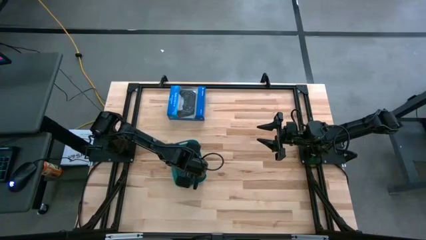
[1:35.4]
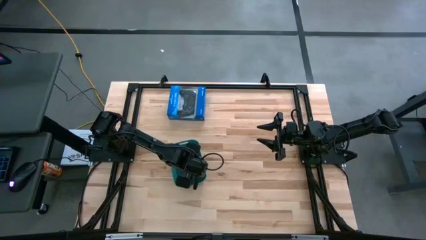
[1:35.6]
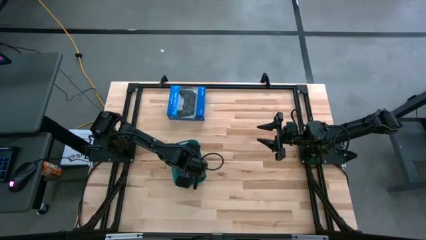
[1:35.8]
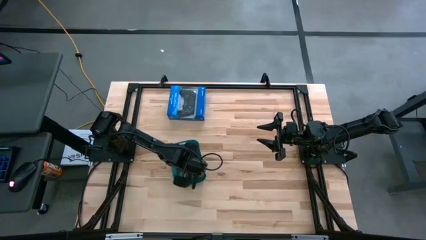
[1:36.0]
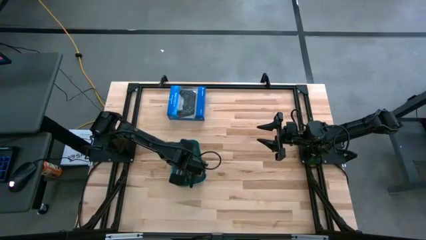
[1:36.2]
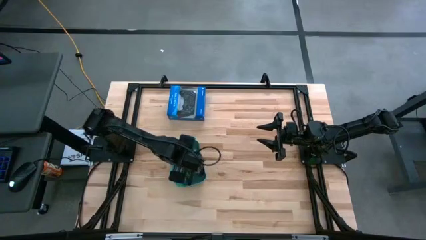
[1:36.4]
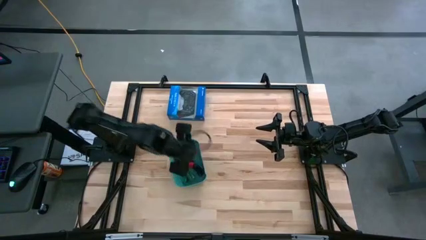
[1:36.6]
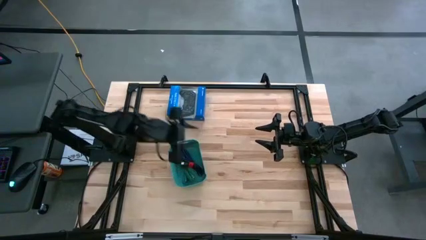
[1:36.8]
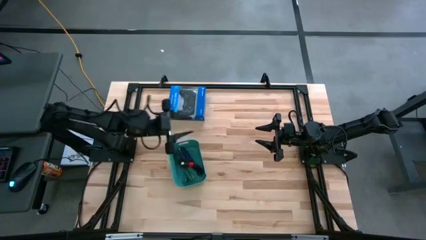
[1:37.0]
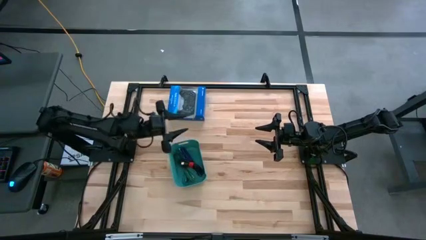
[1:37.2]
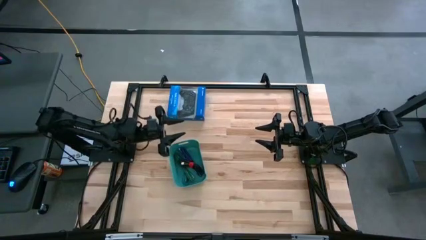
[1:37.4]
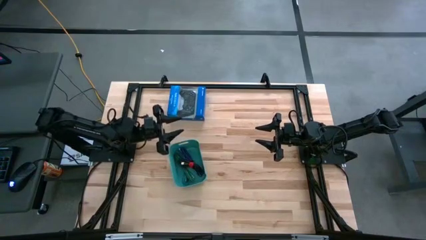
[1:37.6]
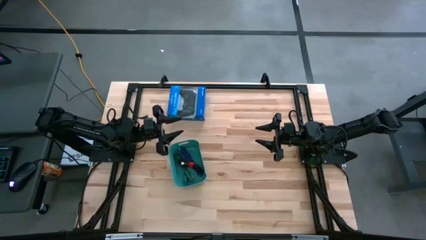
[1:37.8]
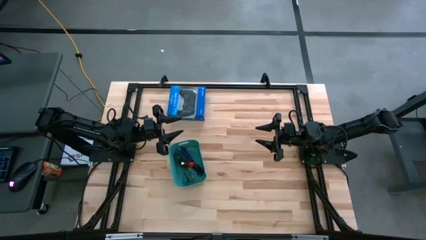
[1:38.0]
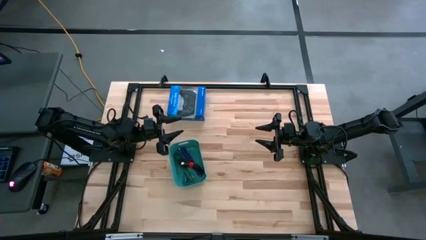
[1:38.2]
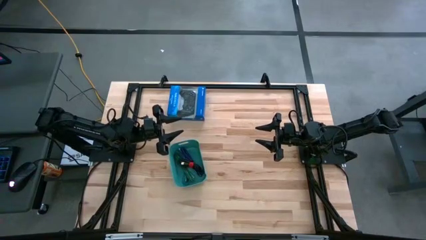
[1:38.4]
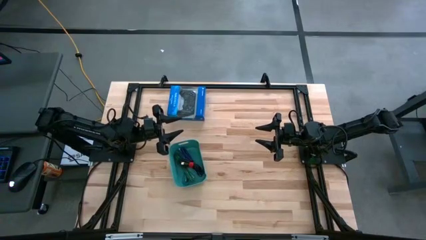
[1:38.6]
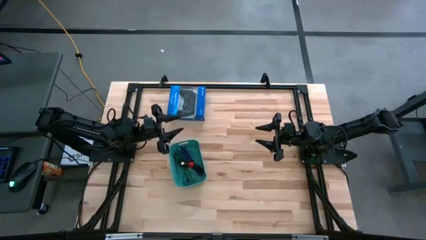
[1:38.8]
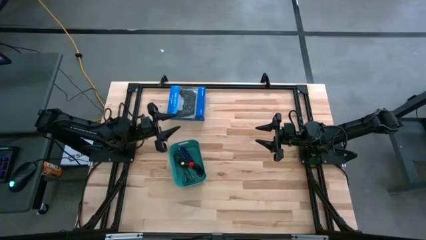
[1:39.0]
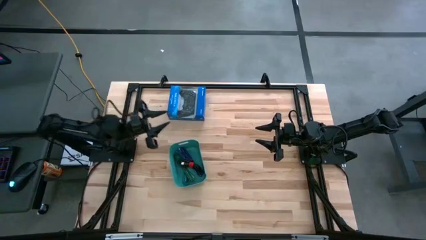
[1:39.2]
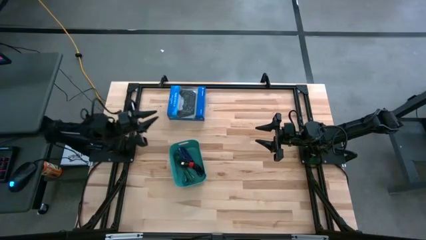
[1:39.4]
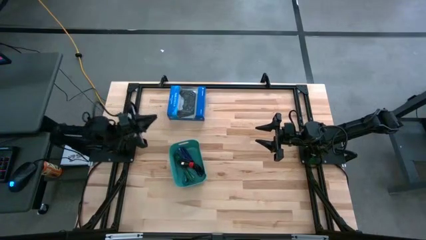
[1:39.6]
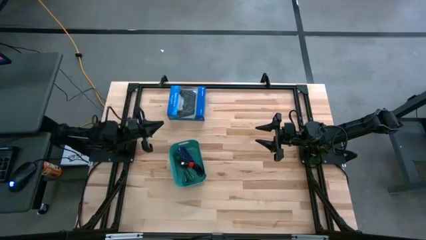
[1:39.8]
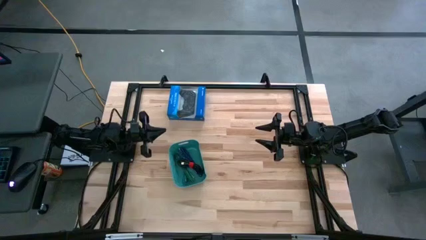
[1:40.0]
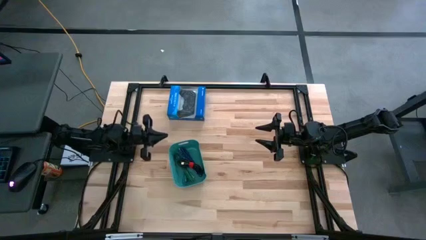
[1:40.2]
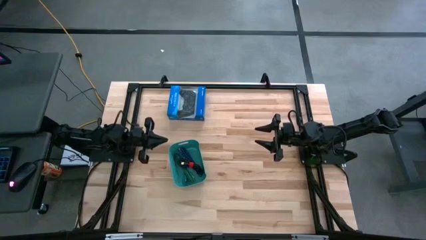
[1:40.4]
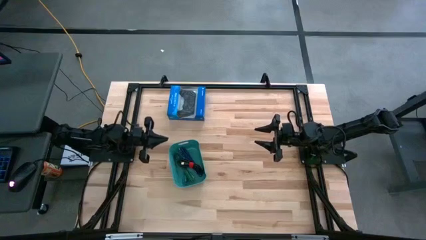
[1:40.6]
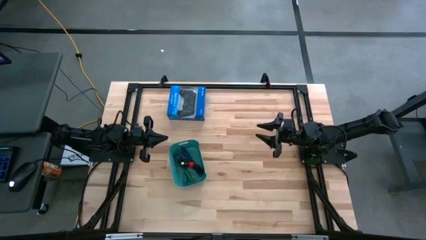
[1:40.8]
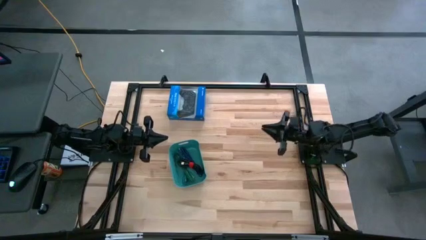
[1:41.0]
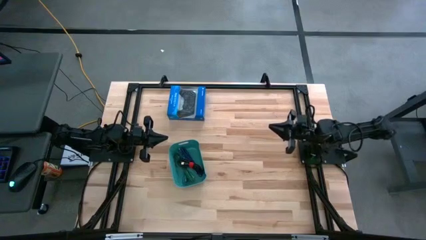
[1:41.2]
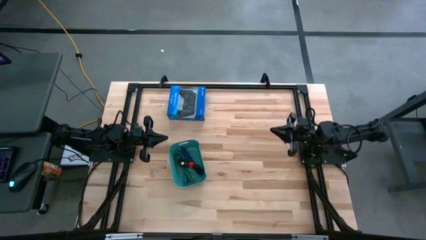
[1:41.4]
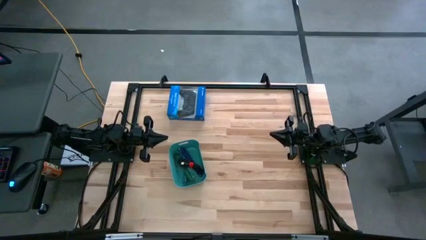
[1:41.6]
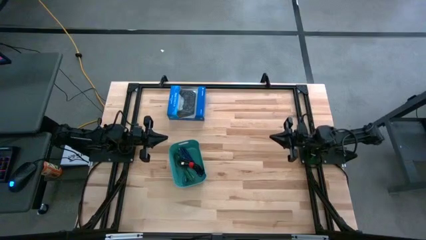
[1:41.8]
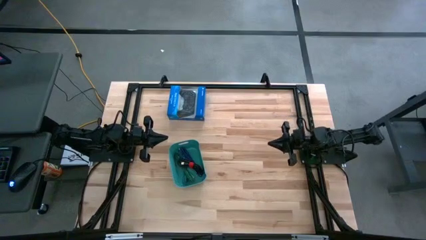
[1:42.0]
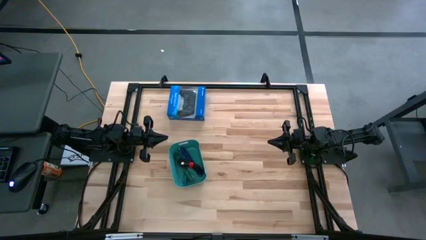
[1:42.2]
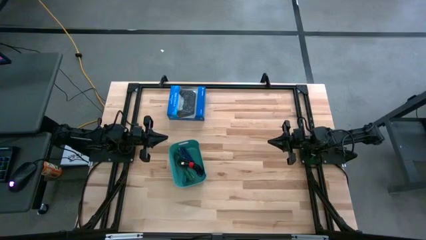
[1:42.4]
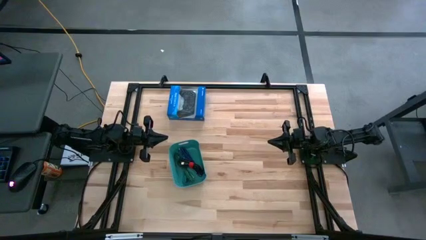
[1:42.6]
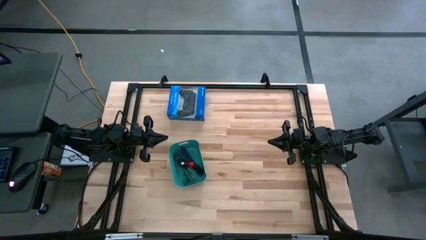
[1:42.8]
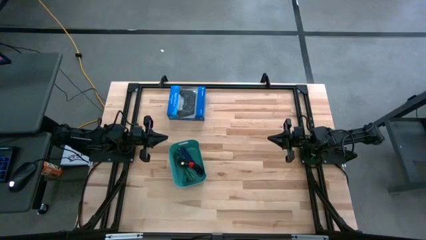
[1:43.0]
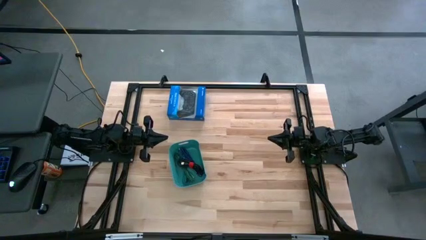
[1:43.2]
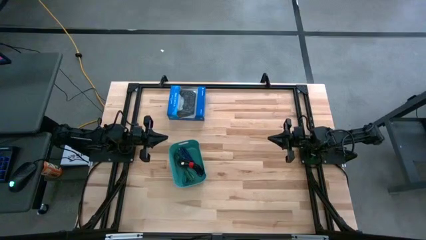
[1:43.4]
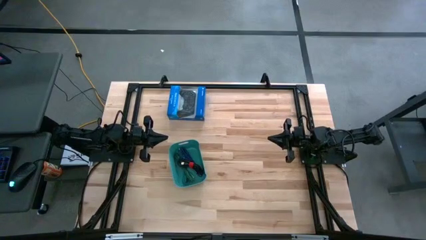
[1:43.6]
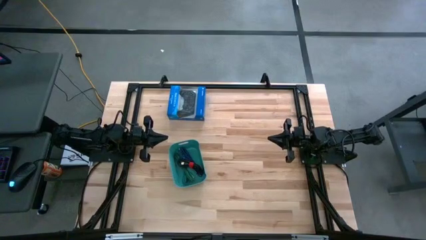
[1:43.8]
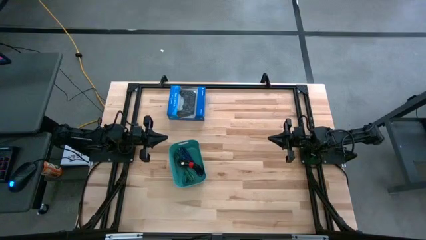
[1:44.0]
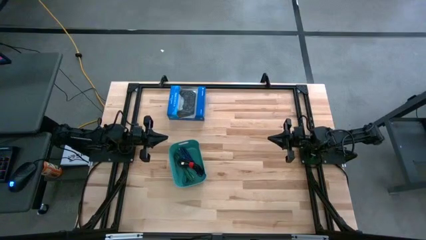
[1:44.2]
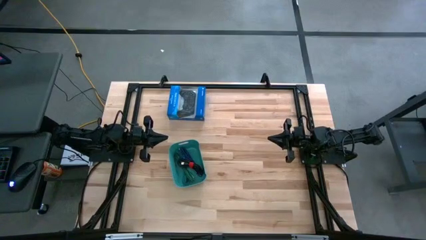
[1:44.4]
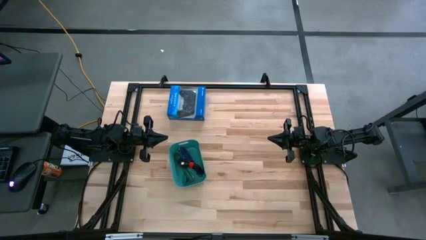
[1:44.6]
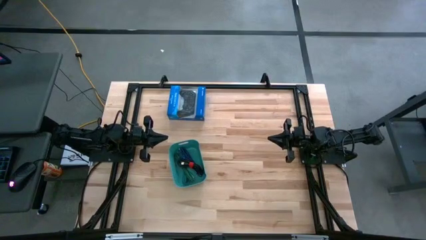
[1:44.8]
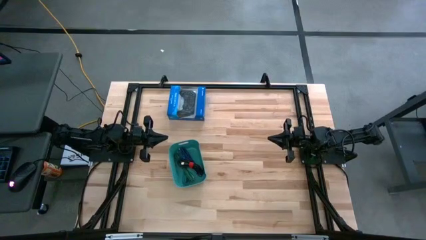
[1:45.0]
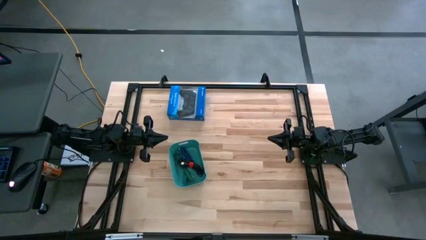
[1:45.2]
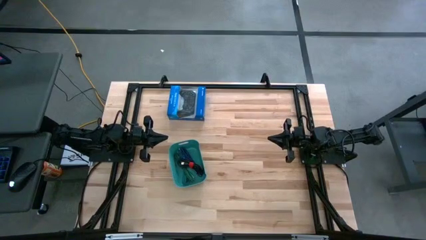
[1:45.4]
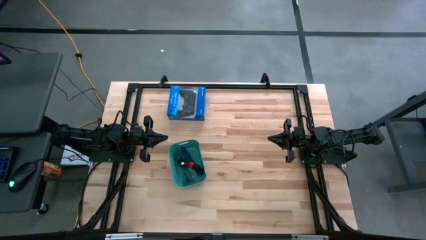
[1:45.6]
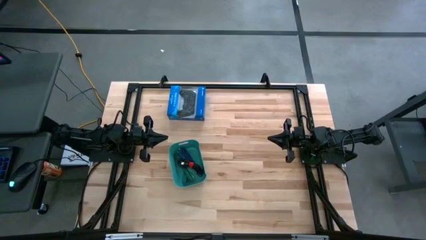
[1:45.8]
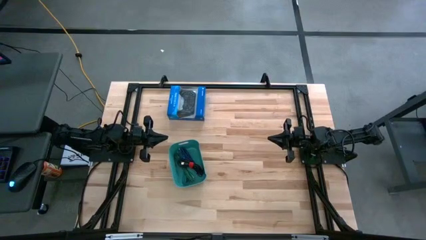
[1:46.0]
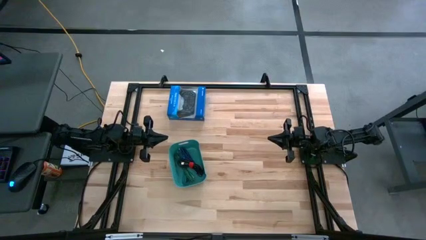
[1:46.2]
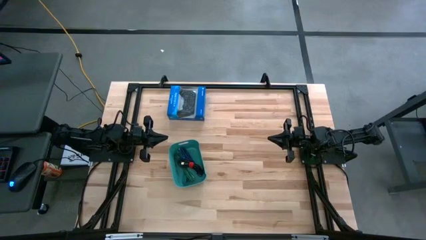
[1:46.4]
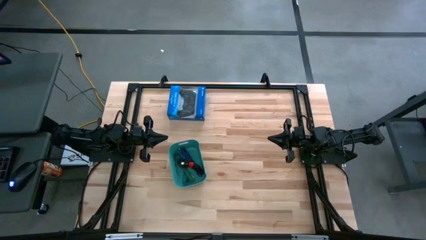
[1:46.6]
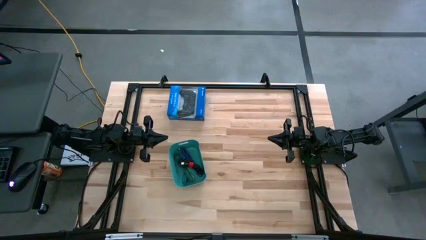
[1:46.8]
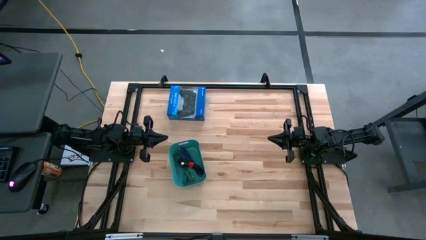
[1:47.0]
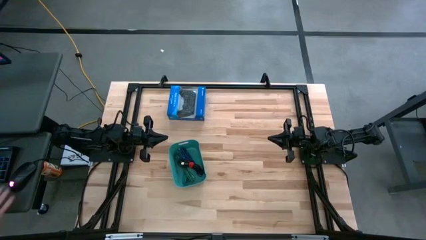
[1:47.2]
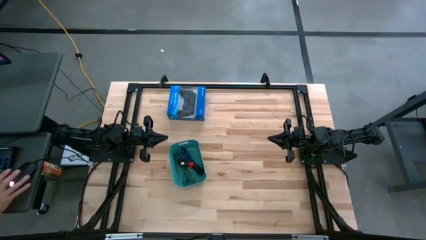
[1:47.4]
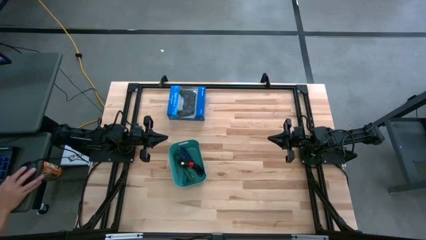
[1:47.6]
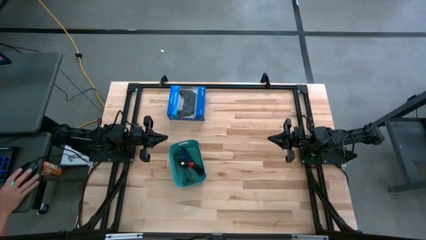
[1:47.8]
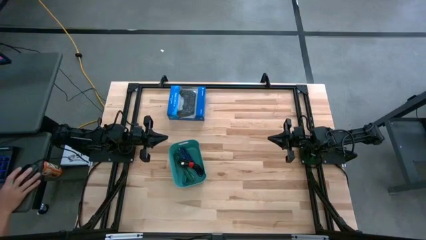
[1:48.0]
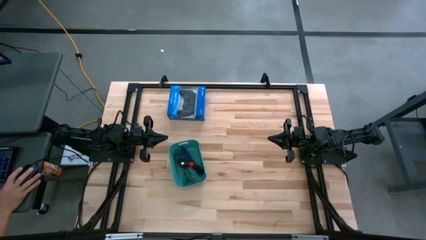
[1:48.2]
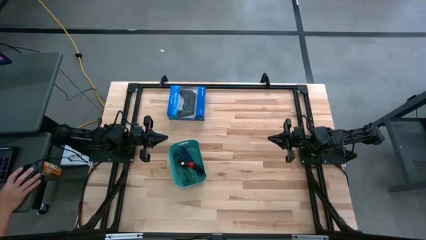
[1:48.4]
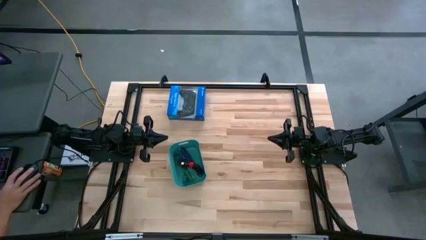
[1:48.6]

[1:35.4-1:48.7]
Task: Pick and place USB-C Cables
Return to Home Position
